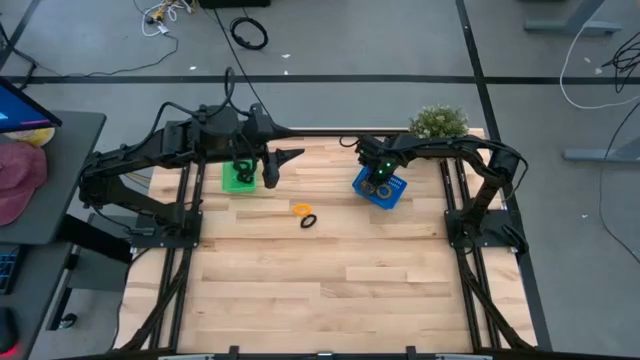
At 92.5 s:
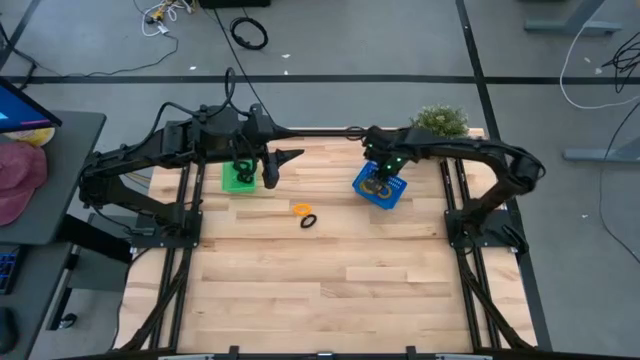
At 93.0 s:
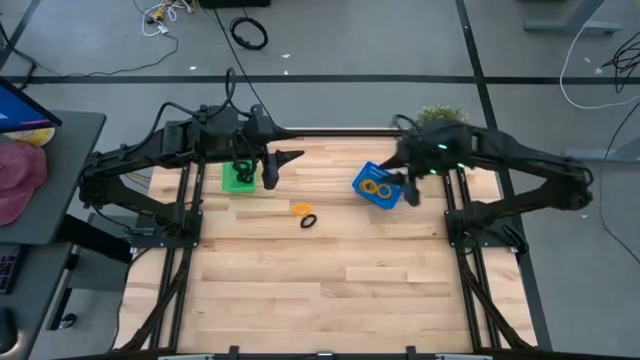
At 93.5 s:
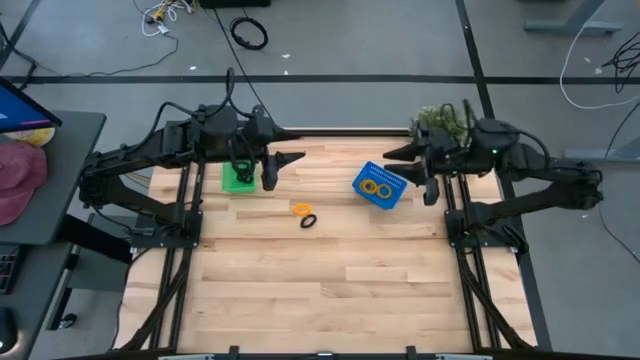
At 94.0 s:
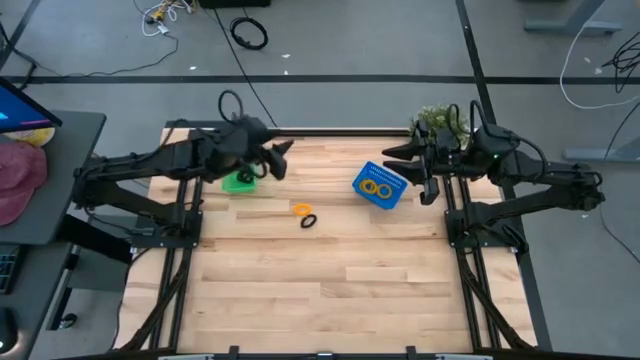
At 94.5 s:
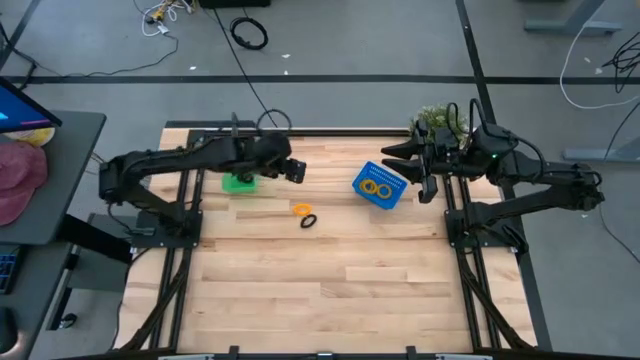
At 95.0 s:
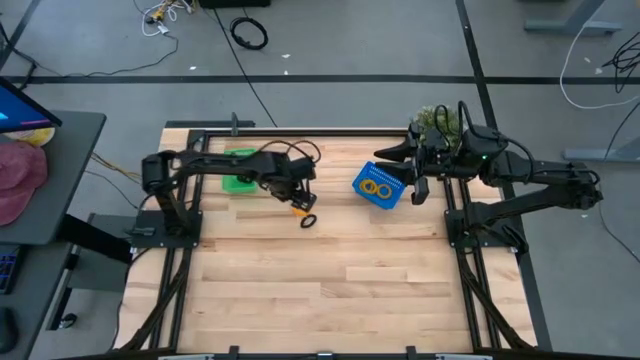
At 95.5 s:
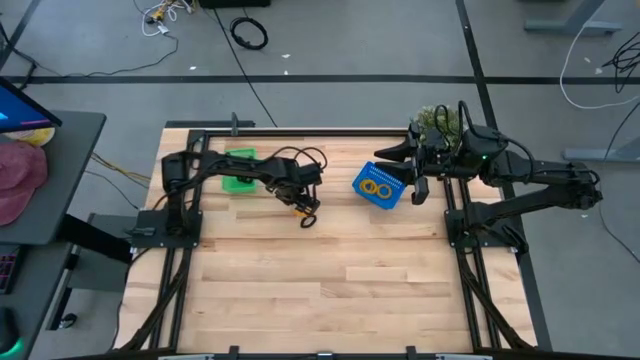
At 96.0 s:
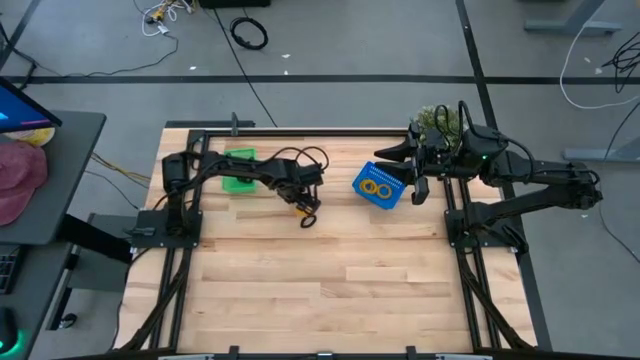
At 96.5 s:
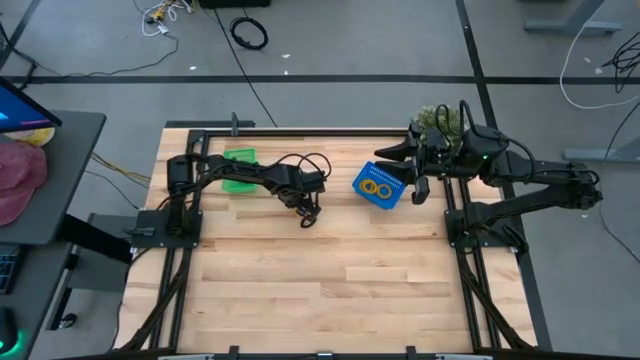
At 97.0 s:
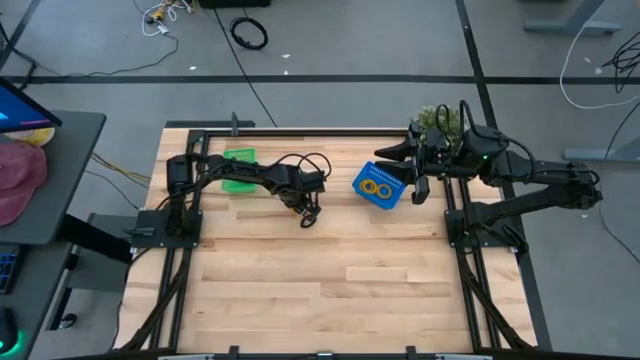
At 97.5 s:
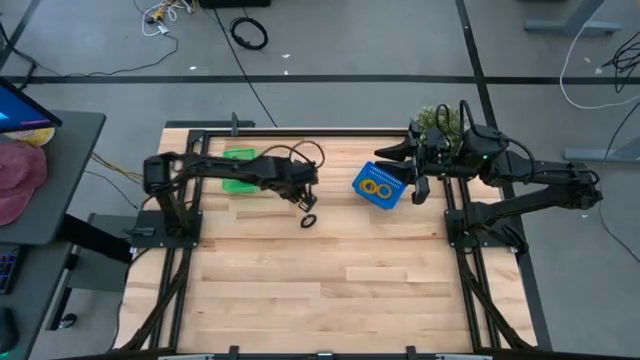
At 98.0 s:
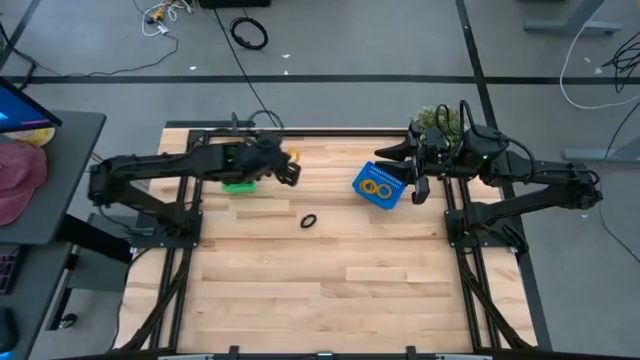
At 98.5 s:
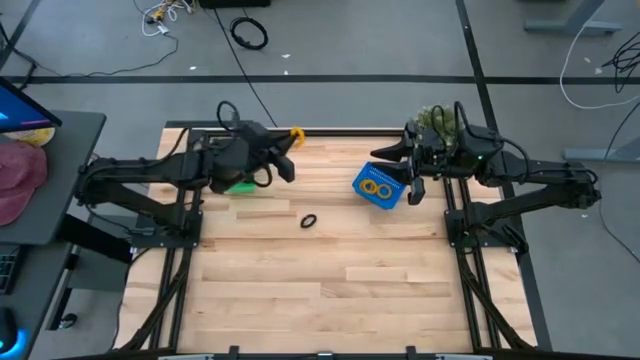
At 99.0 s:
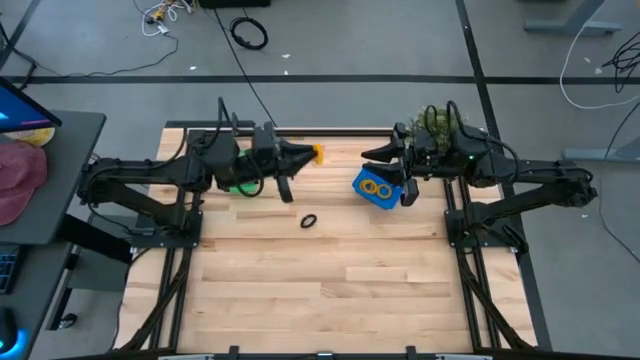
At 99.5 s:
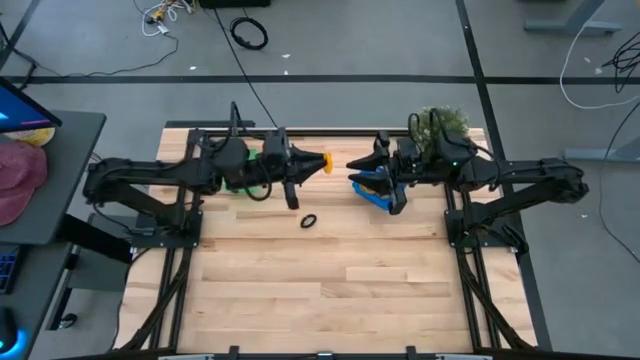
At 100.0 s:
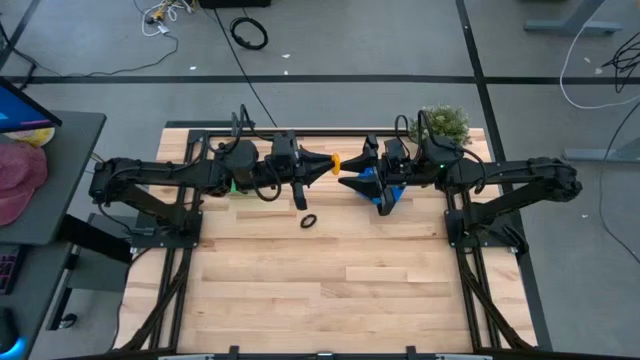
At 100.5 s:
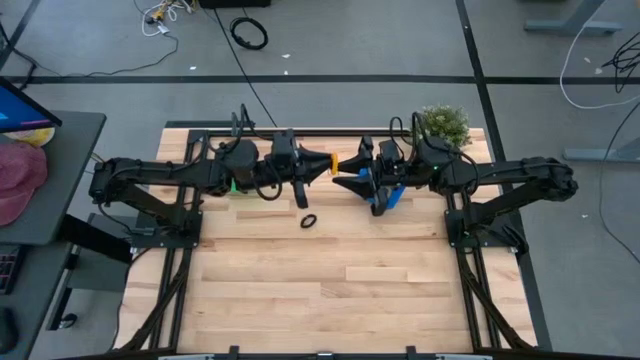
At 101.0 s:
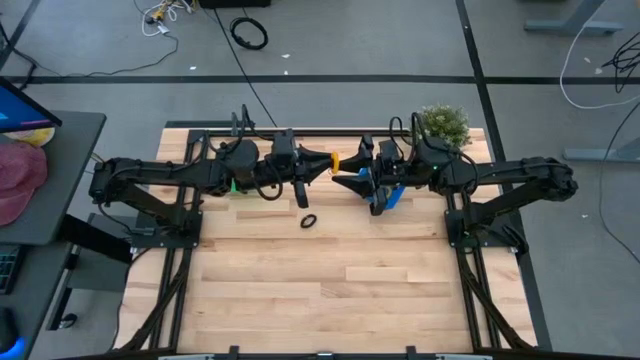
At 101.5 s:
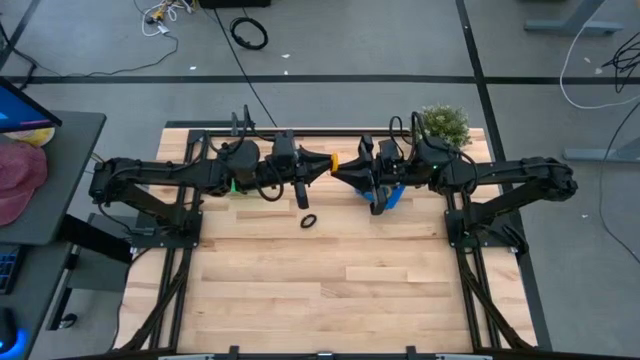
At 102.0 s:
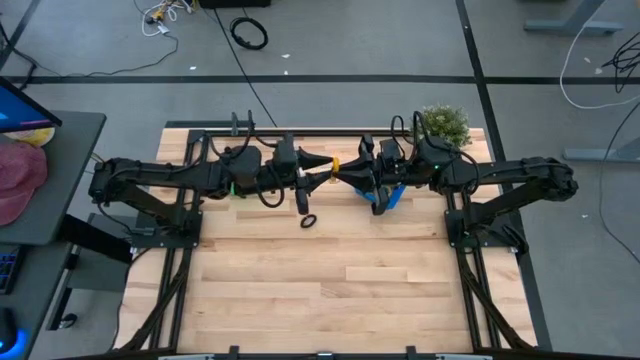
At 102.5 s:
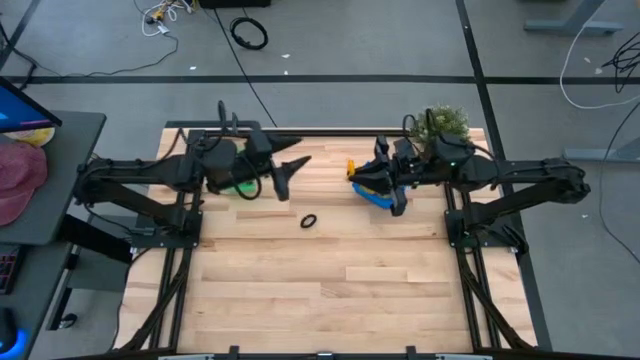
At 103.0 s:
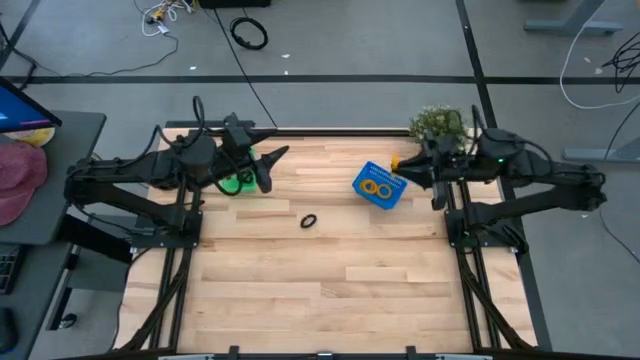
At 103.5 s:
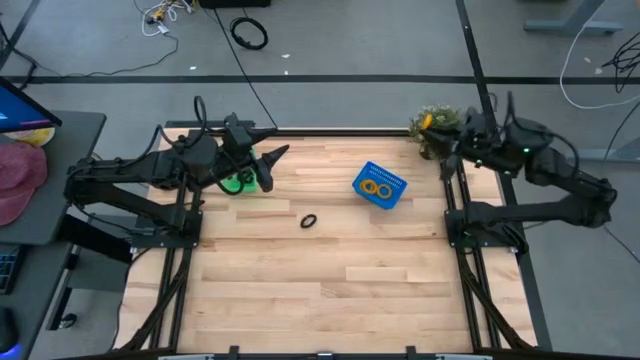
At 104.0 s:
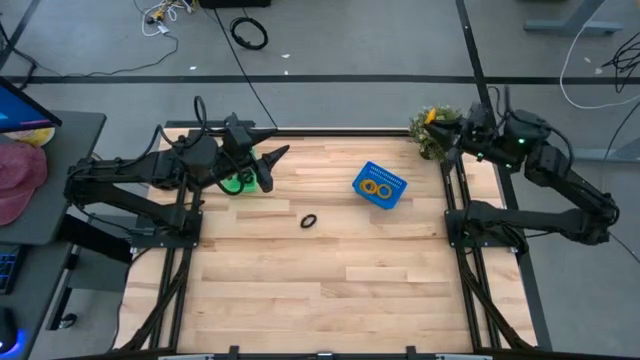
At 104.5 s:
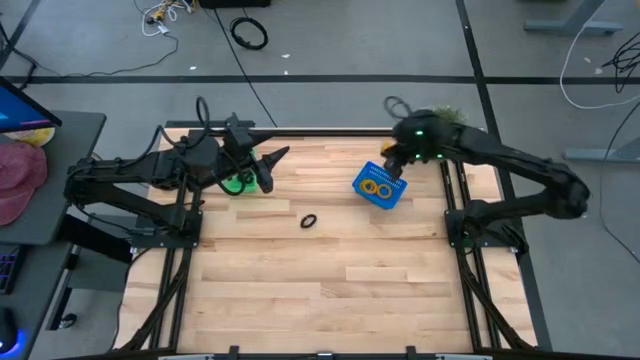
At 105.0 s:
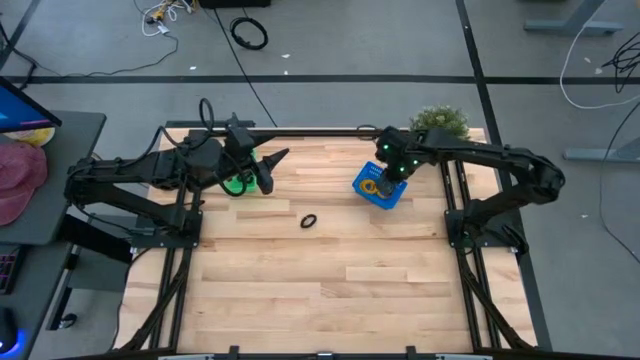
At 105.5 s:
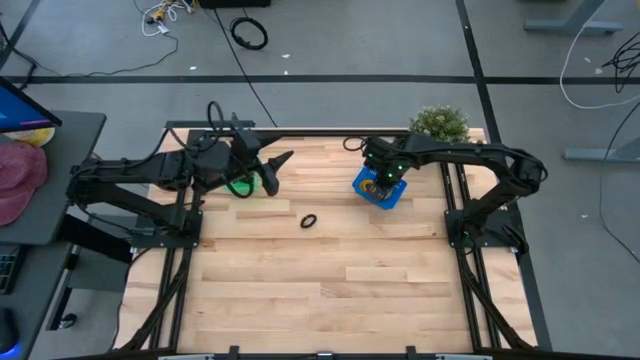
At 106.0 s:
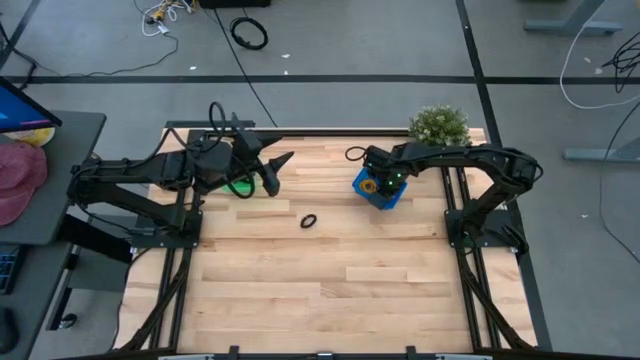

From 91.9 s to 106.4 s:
Task: Sort spring keychains
Put the yellow spring keychain into the blue bin

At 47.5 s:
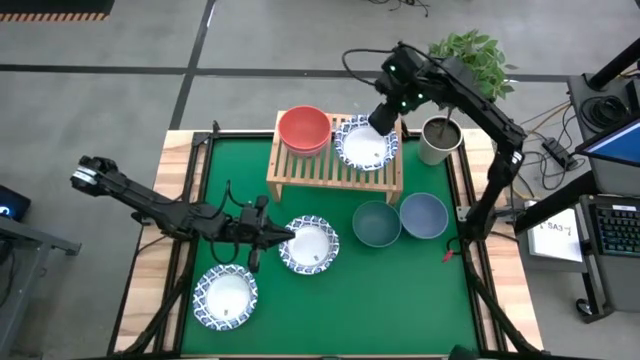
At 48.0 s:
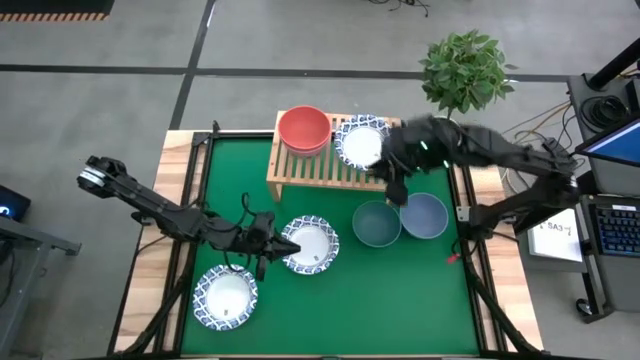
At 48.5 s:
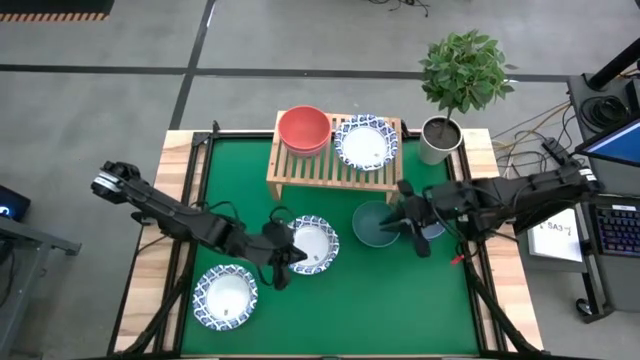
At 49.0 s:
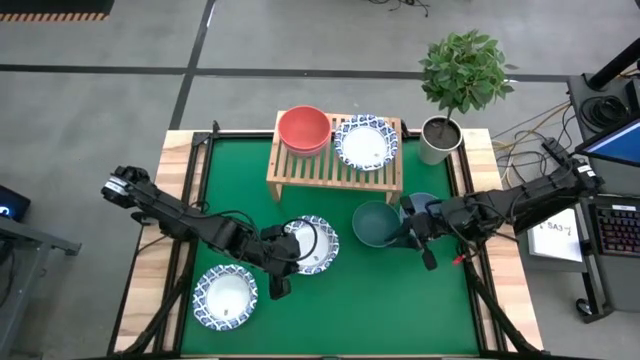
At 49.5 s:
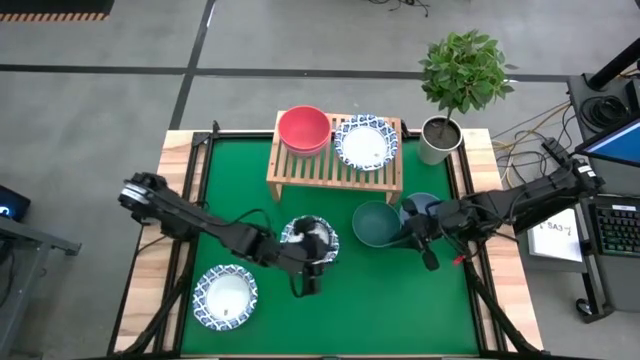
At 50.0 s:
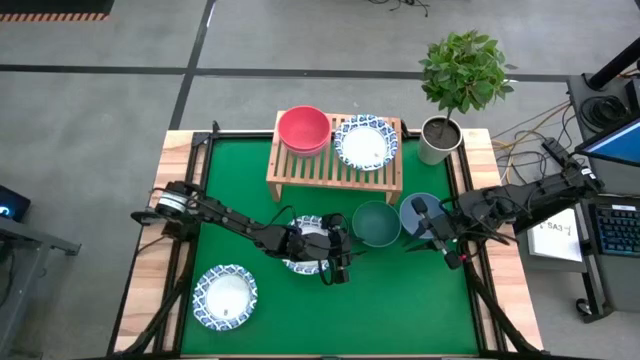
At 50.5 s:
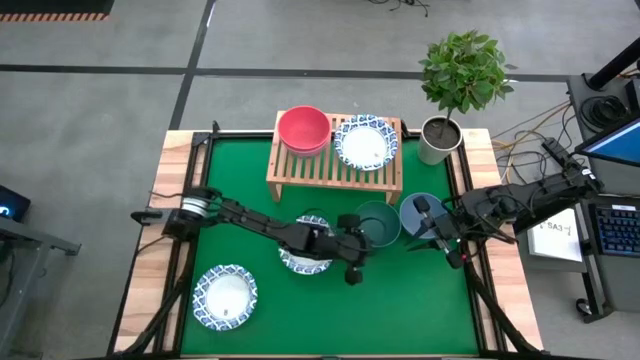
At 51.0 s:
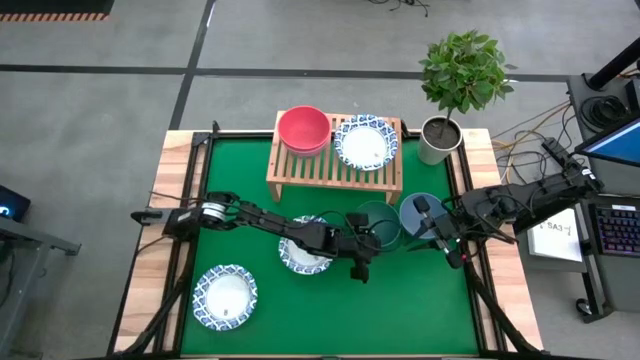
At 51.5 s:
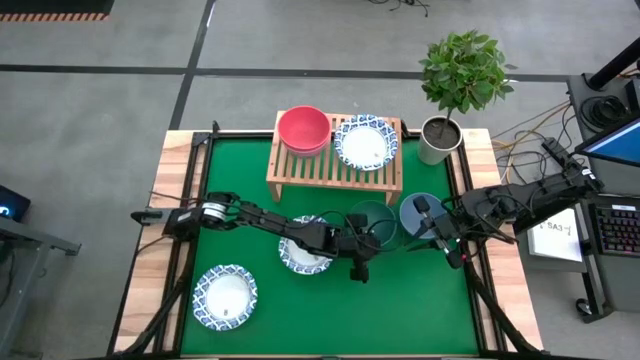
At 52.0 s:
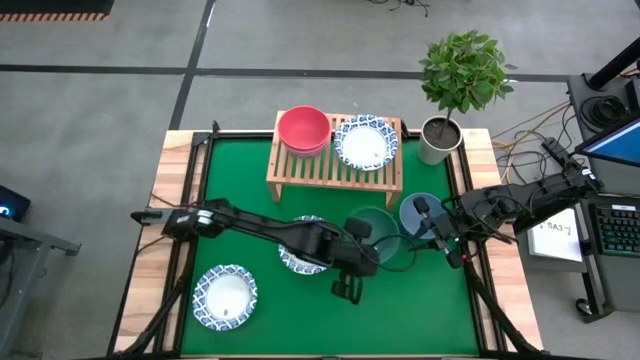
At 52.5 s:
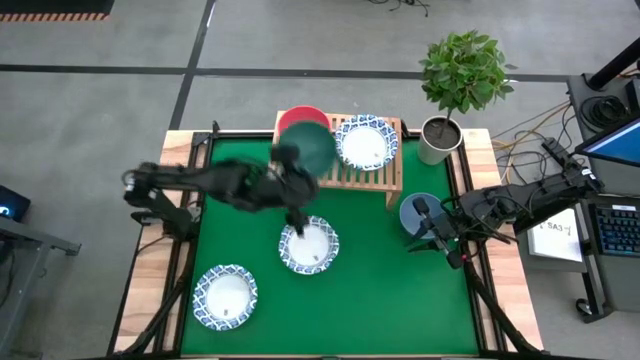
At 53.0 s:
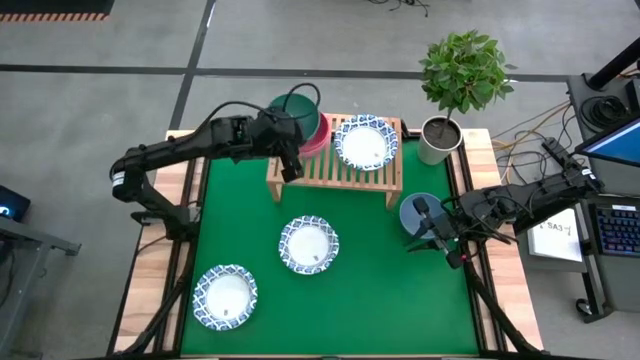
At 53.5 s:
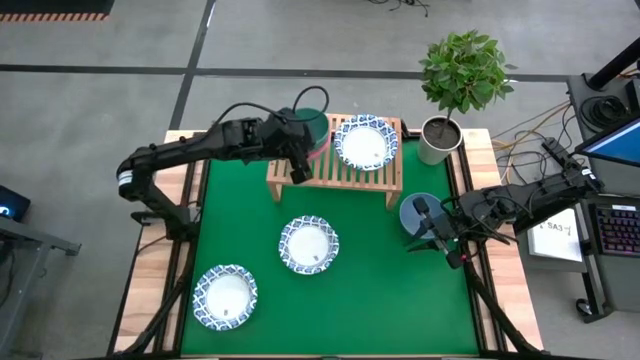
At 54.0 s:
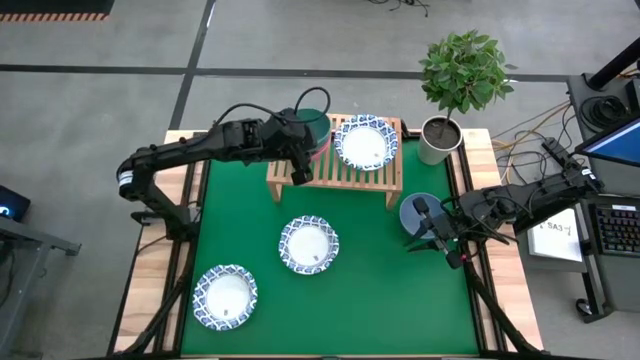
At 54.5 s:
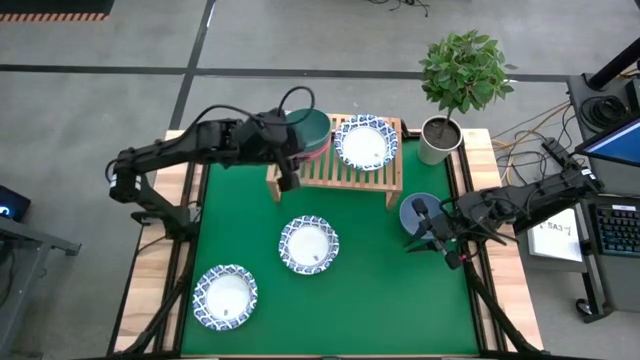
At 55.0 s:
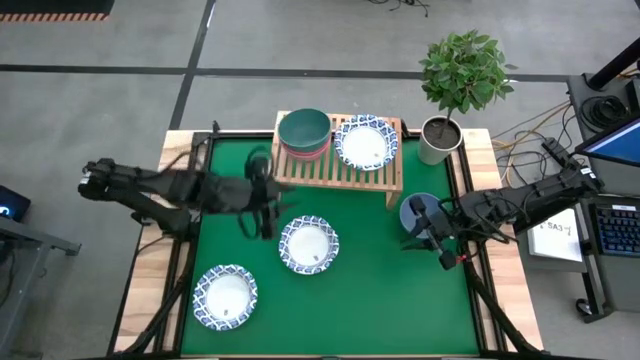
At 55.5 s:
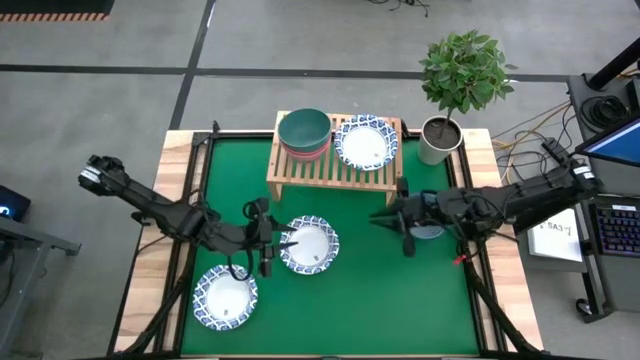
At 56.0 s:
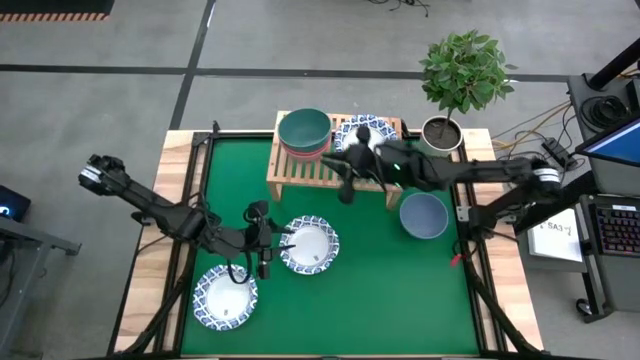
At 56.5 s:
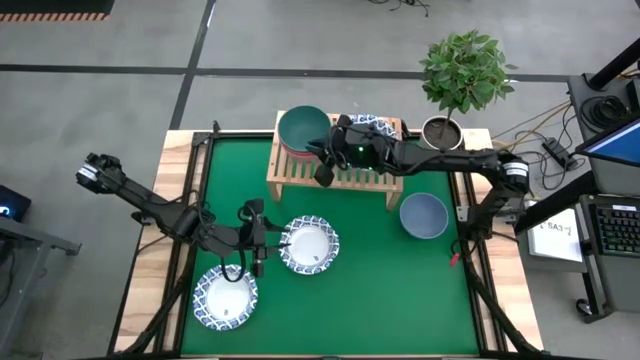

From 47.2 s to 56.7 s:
Task: Place and stack bowls onto a shelf
Stack the green bowl on top of the orange bowl on the shelf
